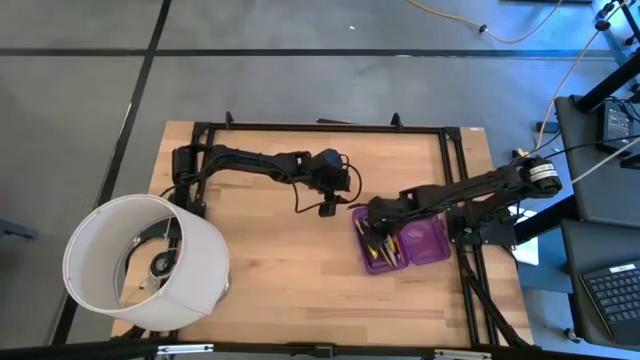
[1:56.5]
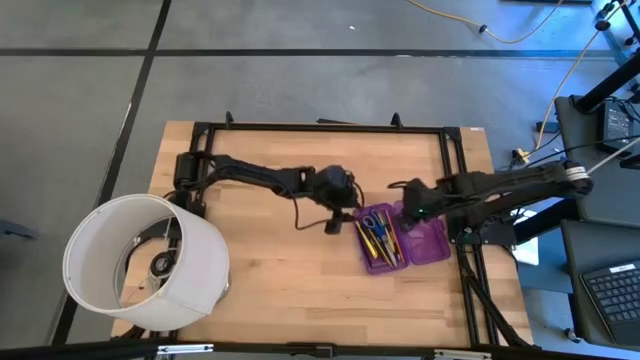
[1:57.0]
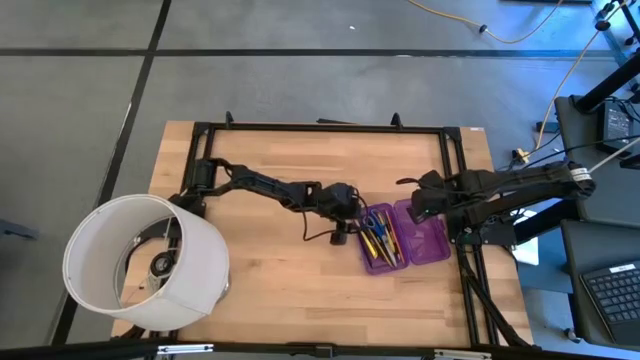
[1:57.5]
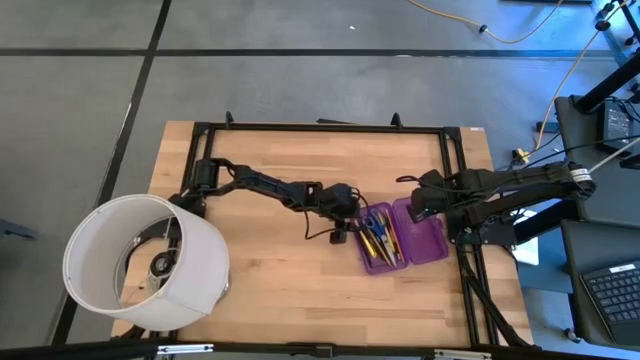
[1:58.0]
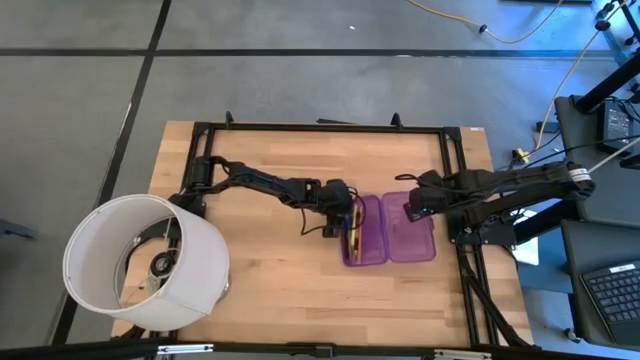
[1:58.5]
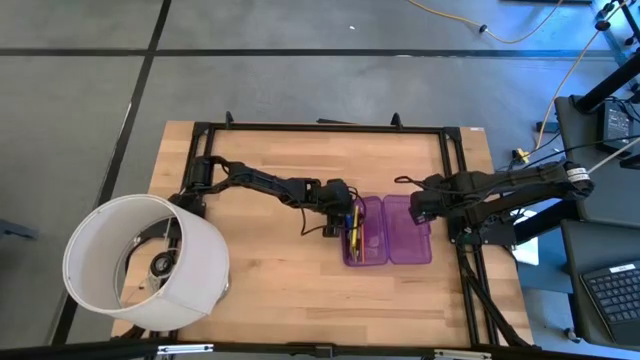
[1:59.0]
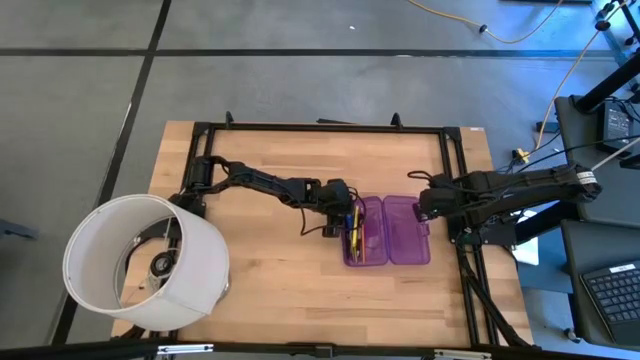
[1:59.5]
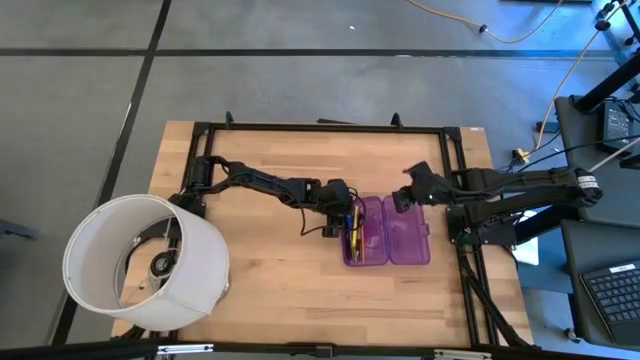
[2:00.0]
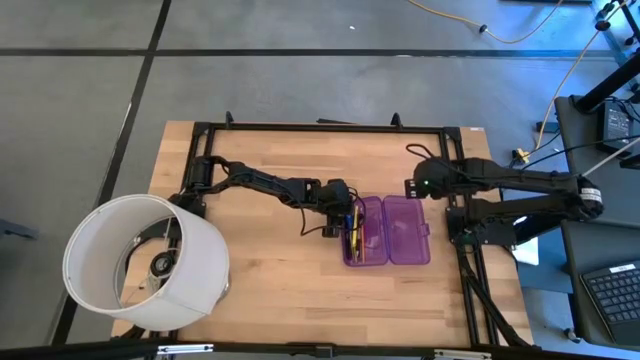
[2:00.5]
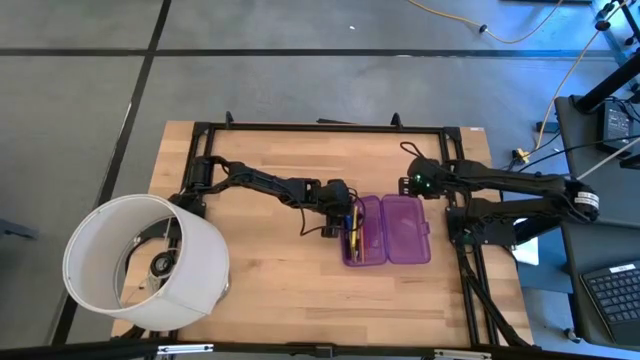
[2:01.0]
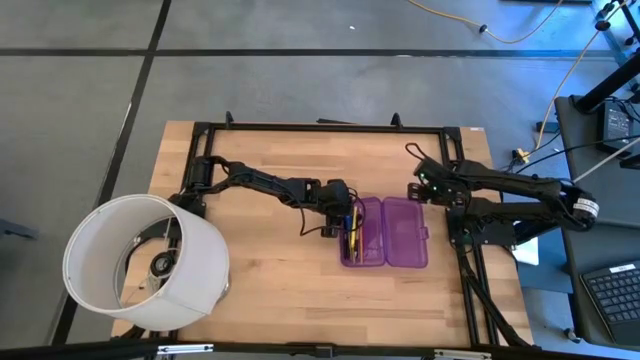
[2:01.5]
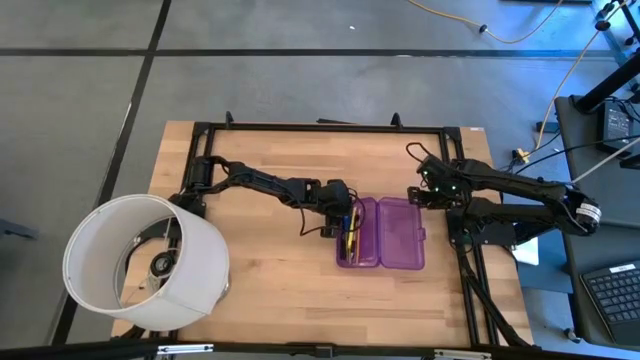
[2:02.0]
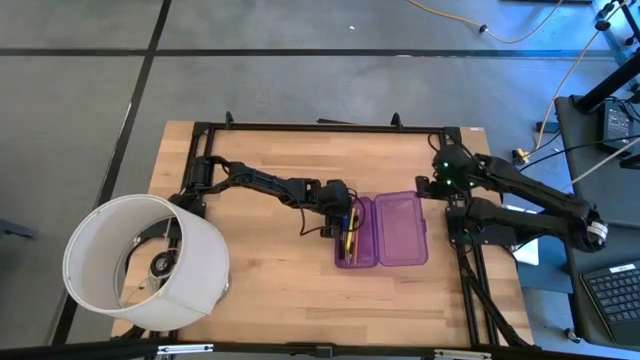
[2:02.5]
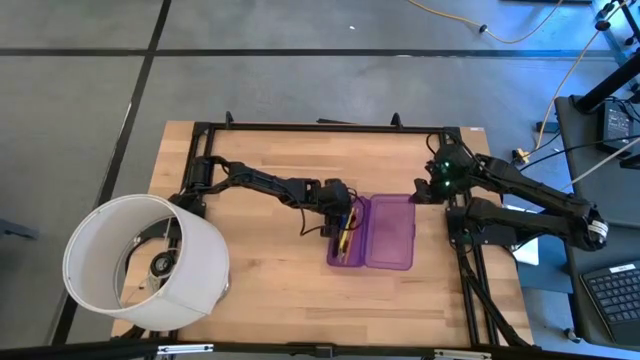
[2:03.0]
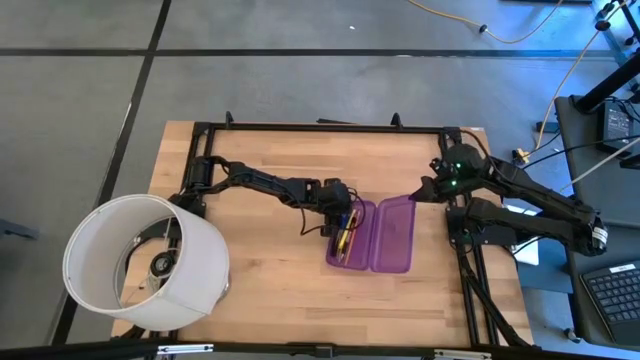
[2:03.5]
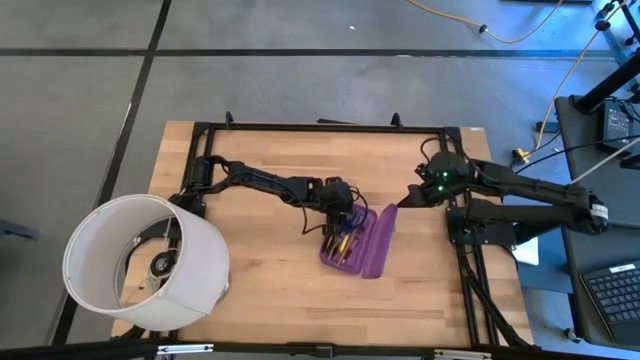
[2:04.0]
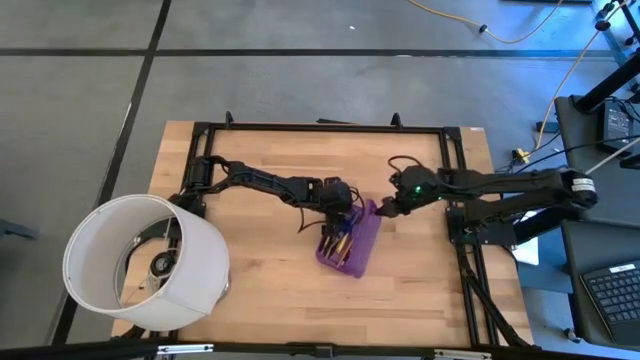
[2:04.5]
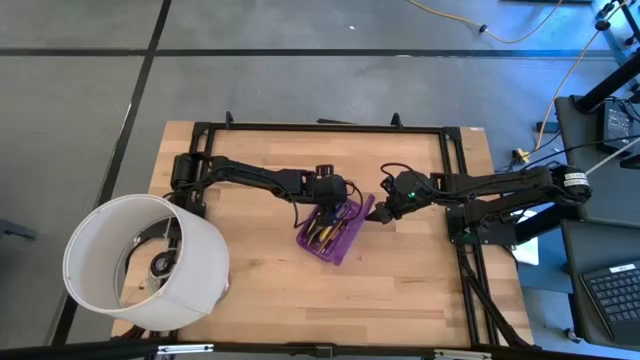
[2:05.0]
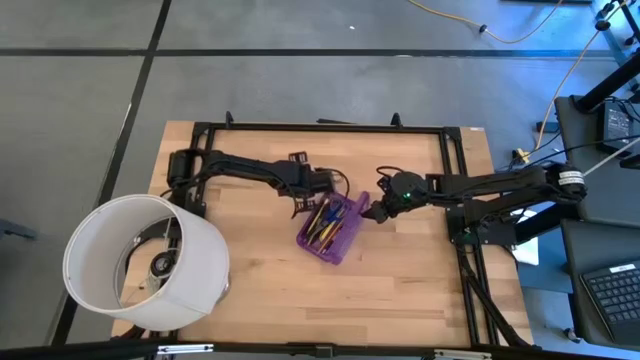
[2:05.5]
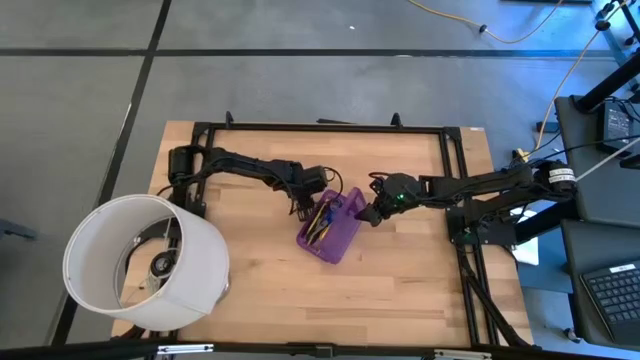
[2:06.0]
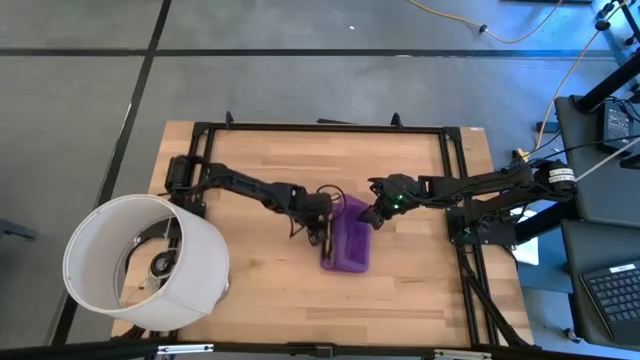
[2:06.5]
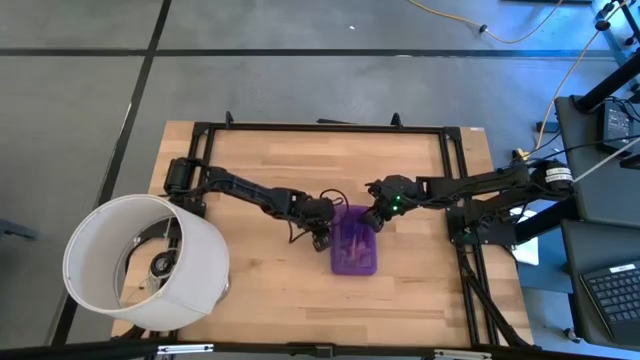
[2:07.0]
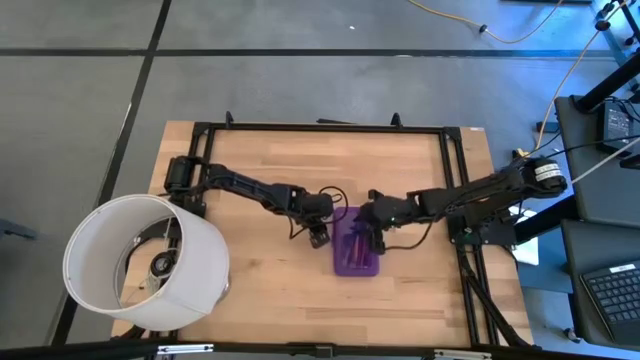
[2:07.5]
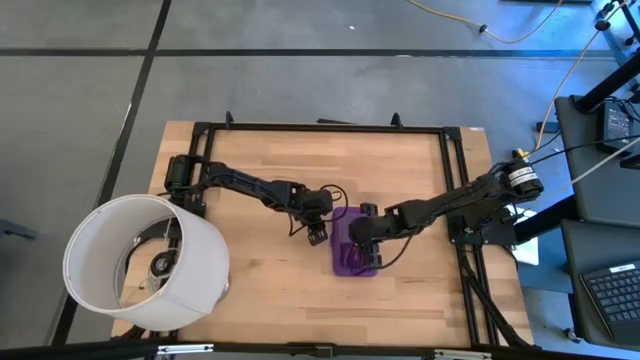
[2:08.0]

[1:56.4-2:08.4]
Task: Pick & place school supplies into a supply box
Close the supply box

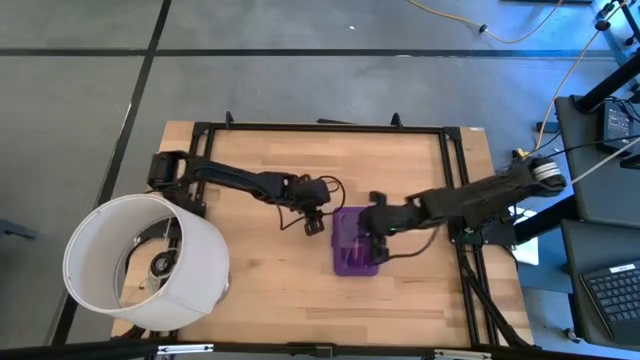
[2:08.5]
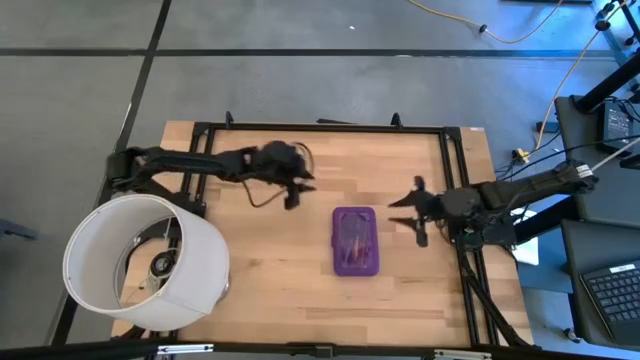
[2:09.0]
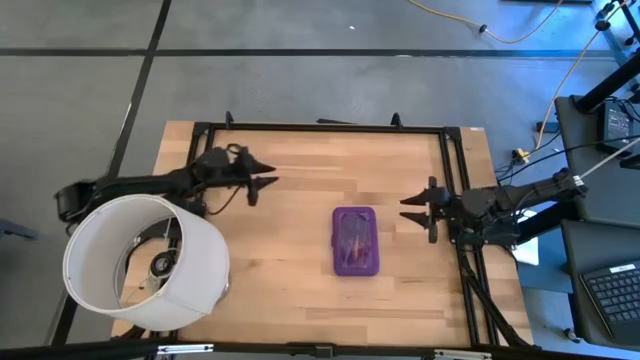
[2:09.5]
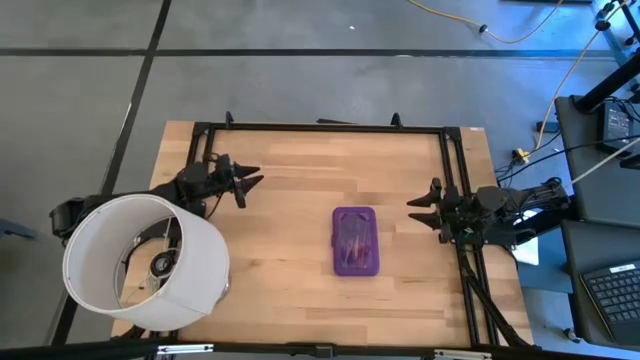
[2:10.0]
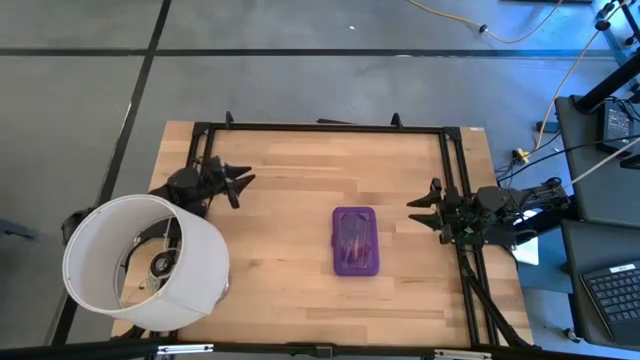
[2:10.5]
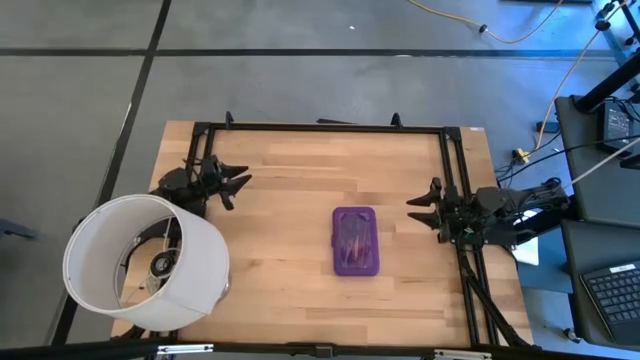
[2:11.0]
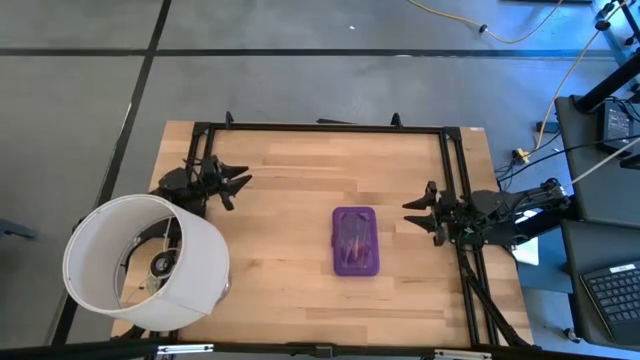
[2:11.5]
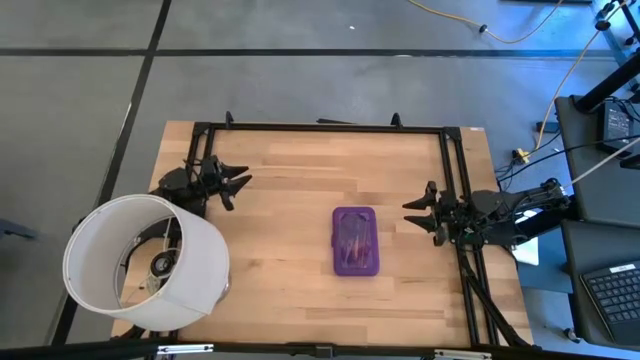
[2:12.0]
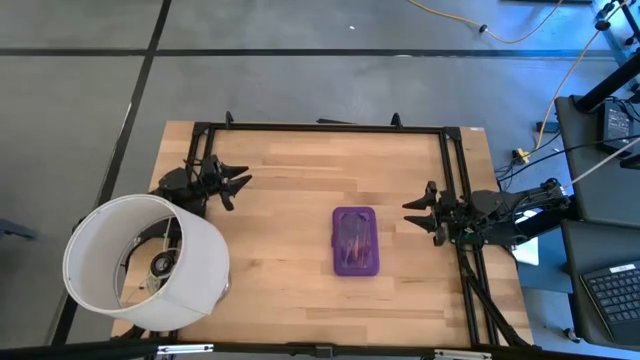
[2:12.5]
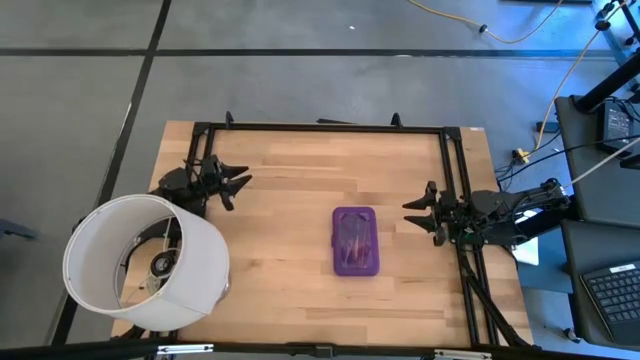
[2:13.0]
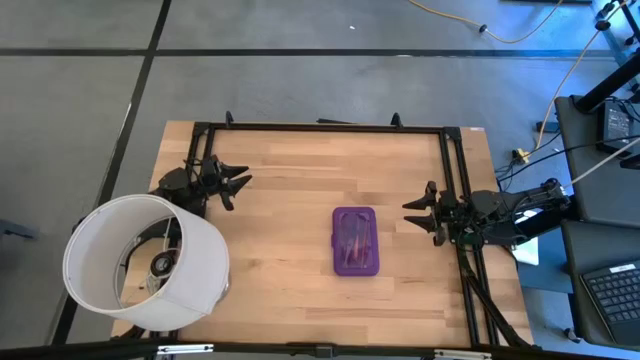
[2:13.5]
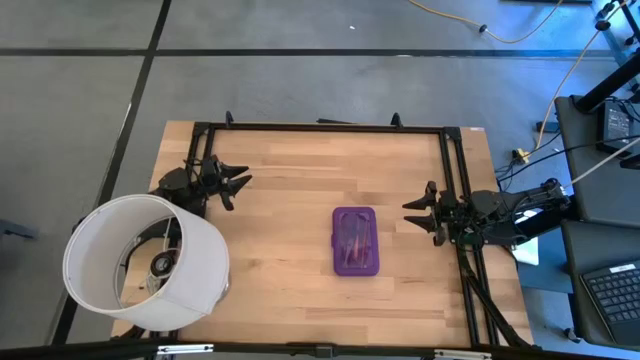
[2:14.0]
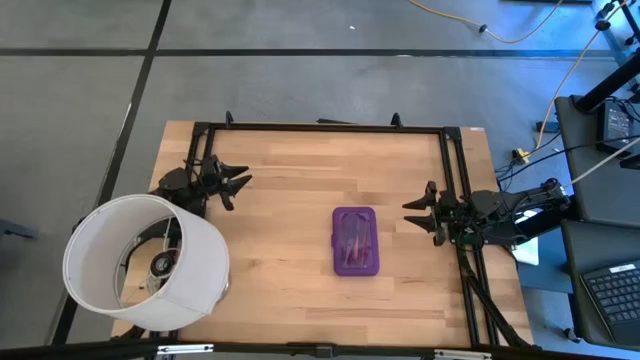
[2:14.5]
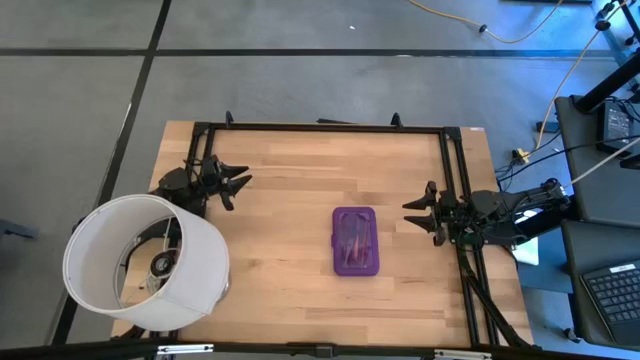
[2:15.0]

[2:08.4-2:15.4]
Return to Home Position

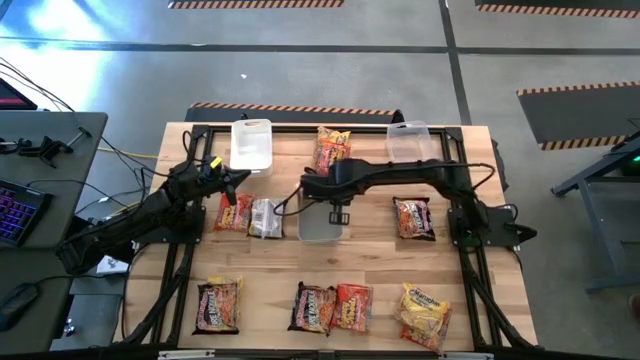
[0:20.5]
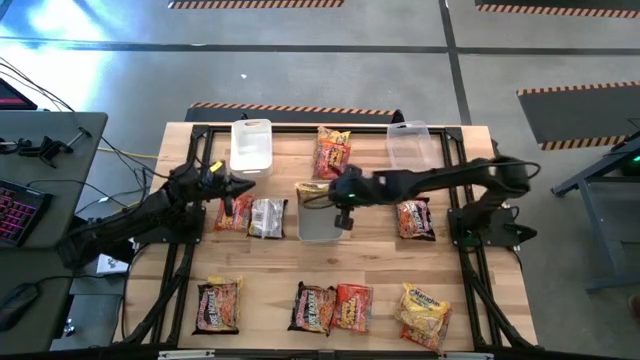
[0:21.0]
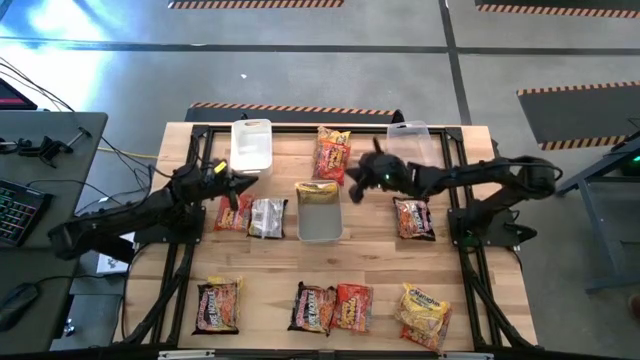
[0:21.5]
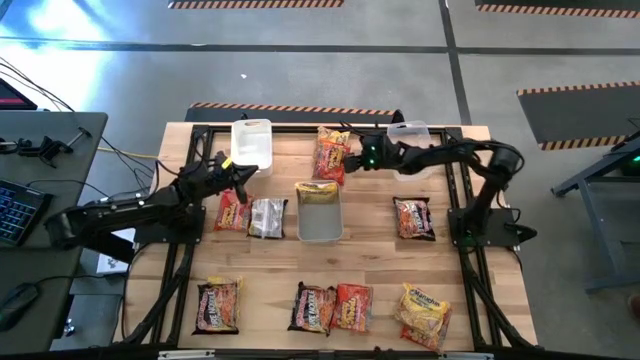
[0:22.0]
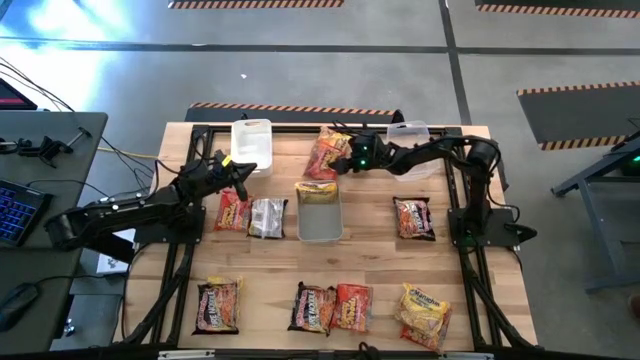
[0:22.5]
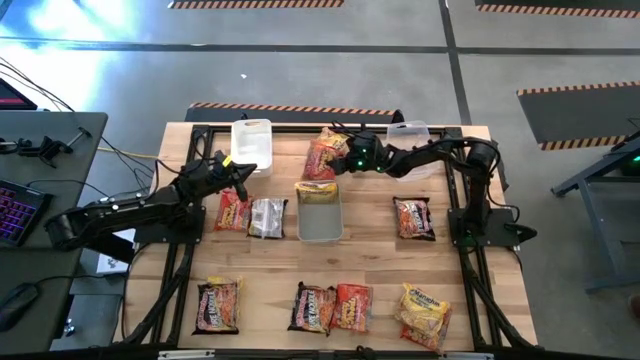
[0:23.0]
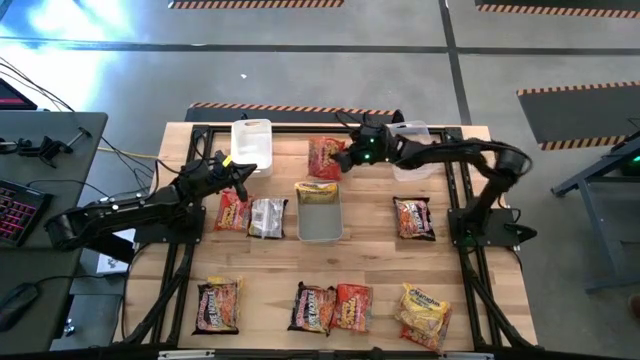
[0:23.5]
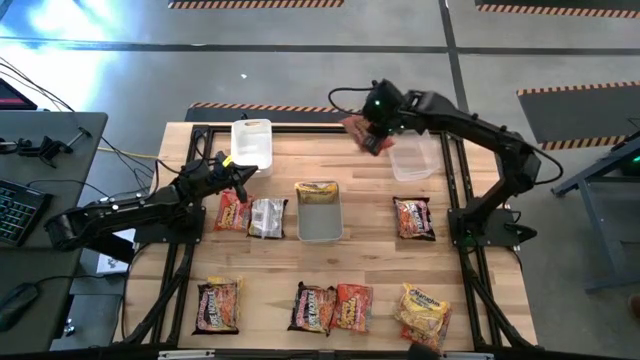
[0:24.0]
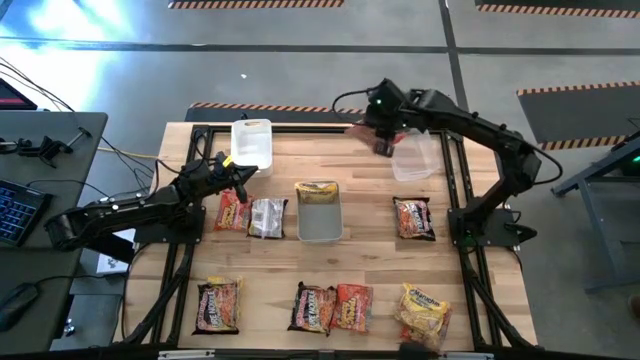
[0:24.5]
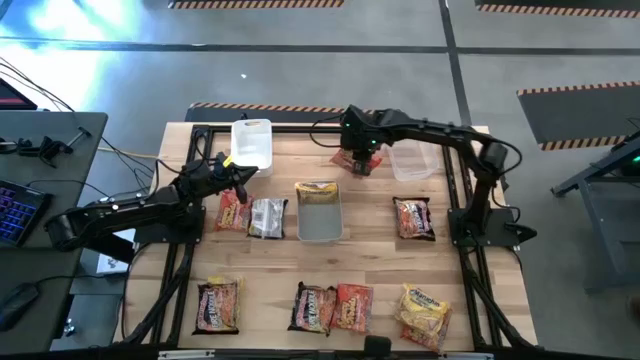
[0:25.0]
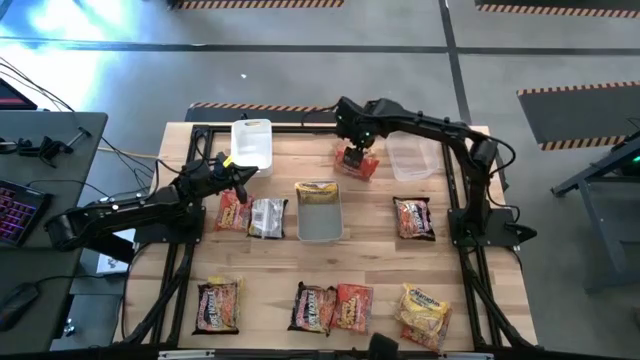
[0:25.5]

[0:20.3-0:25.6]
Task: Sort Maruchan noodles
Put the orange noodle pack into the transparent bin
